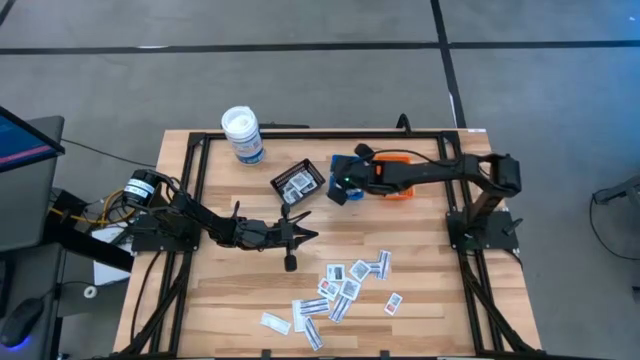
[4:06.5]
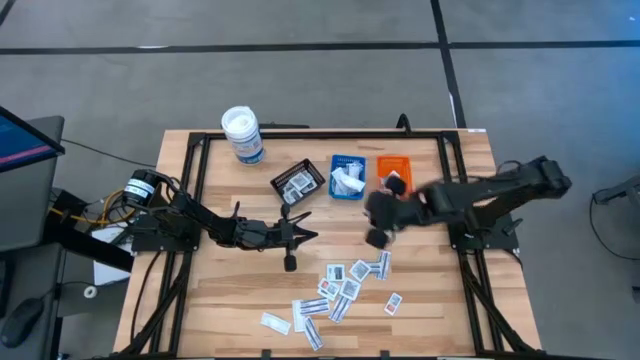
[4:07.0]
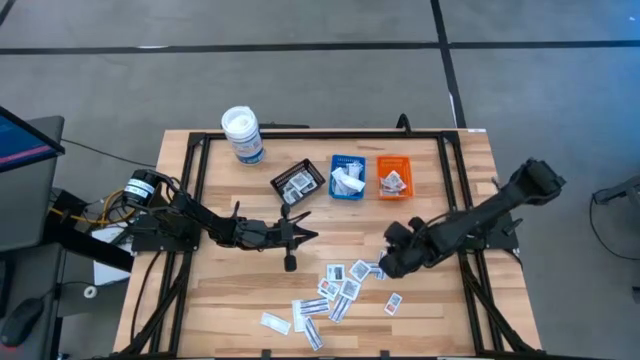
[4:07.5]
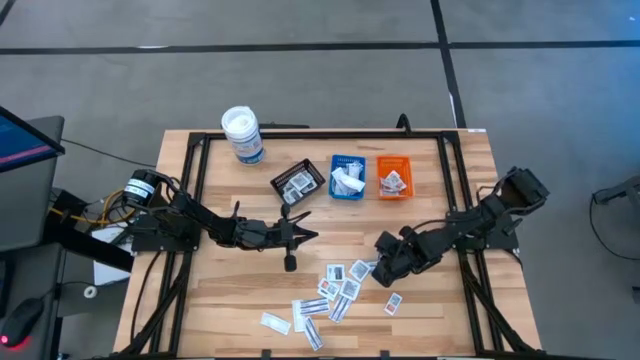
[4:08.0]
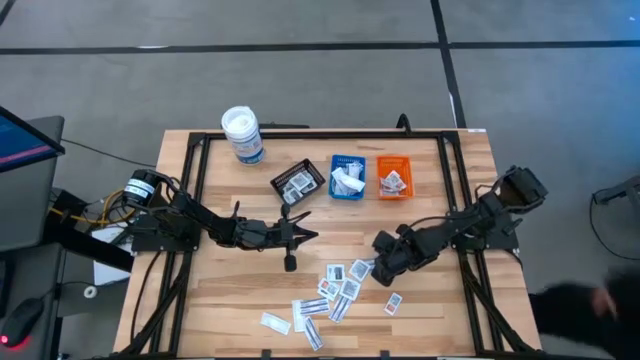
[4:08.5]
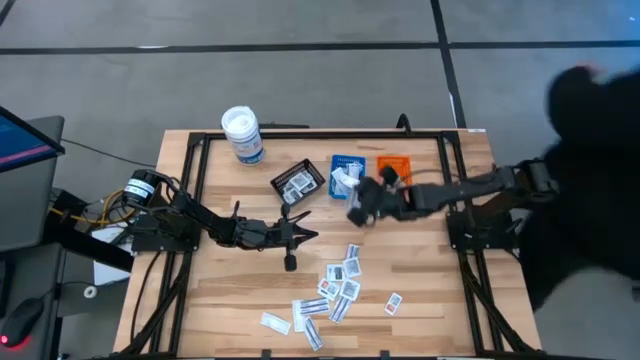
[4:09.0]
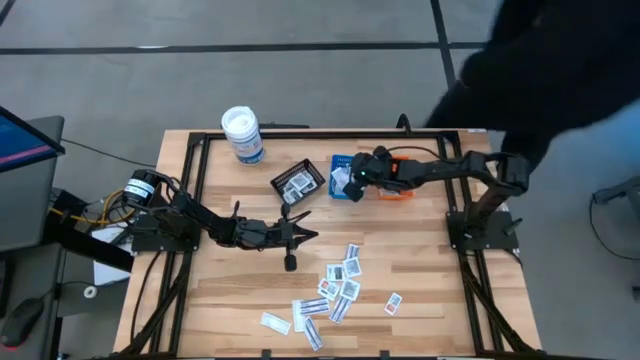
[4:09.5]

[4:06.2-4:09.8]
Task: Pick & Place First Aid Supplies
Put the blue bandage into the blue bin

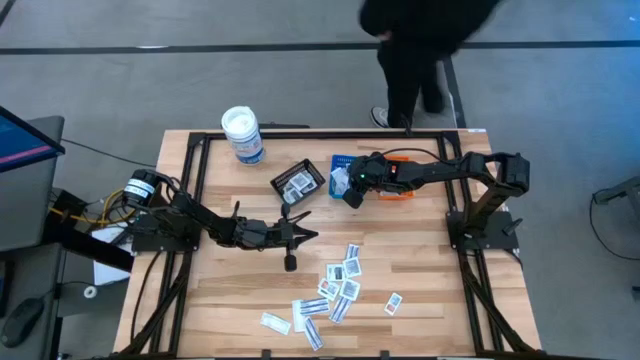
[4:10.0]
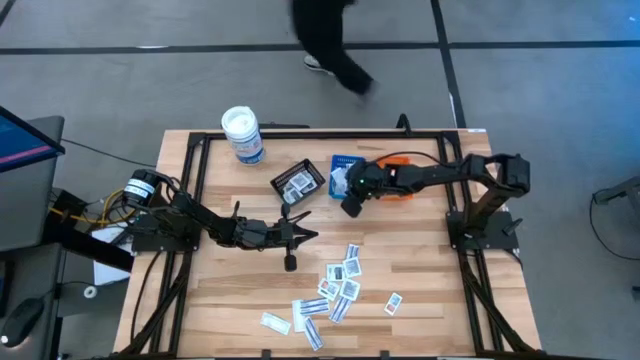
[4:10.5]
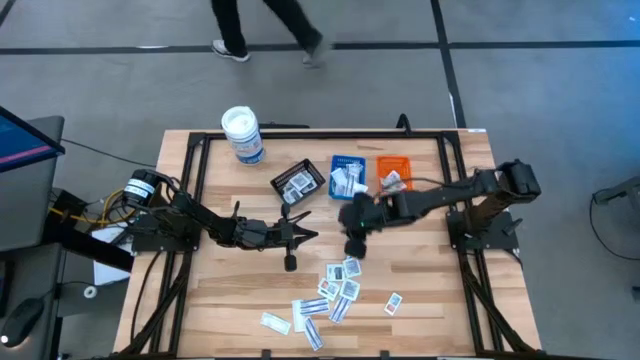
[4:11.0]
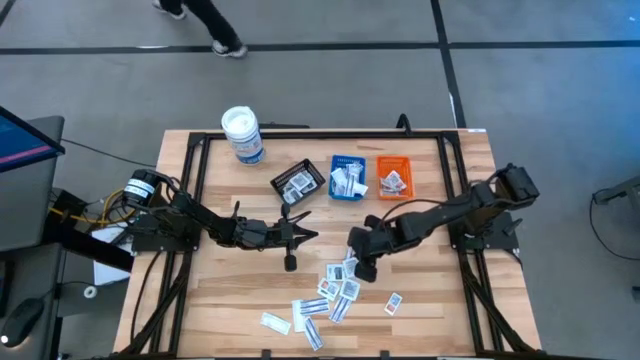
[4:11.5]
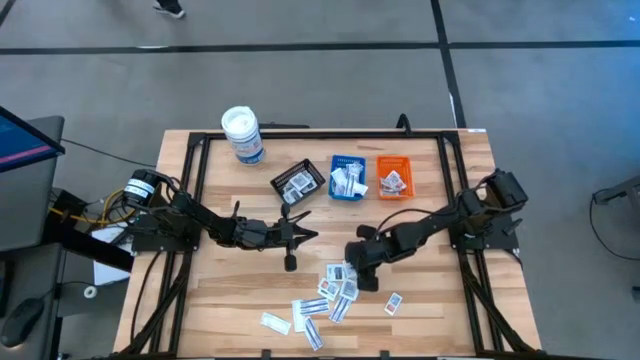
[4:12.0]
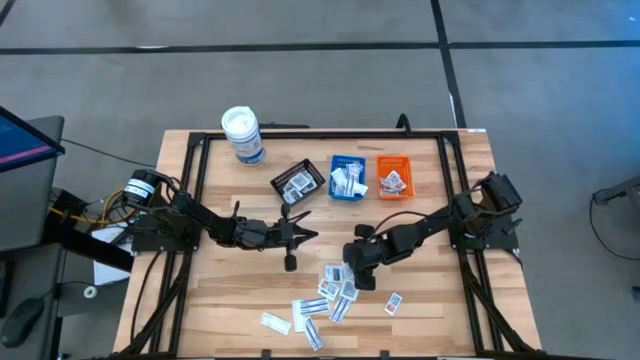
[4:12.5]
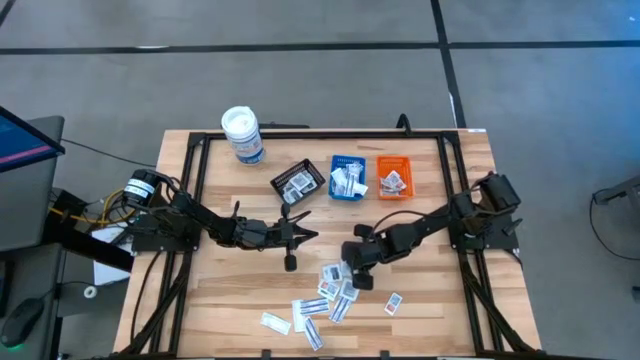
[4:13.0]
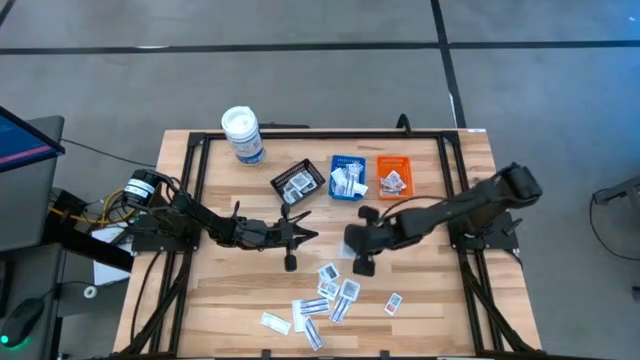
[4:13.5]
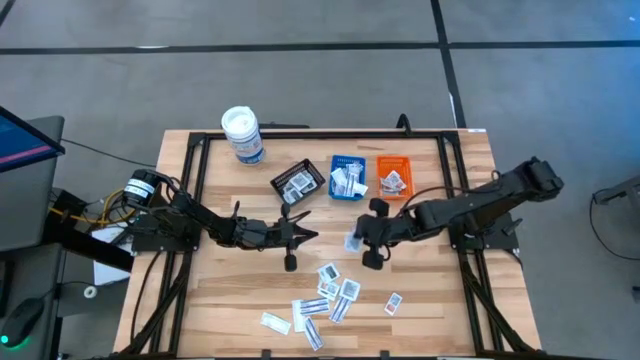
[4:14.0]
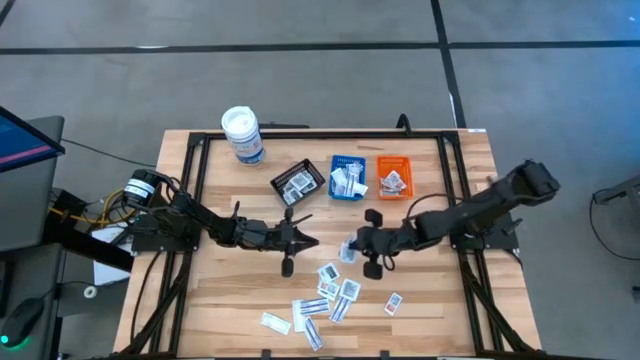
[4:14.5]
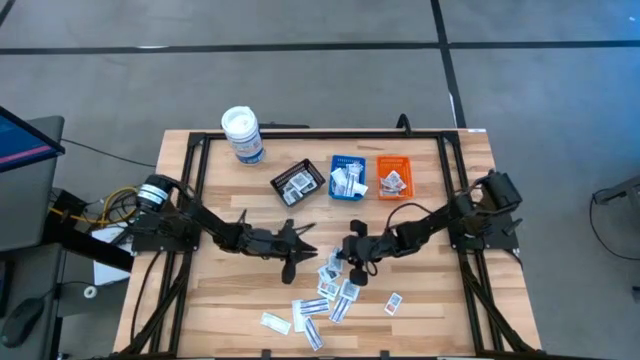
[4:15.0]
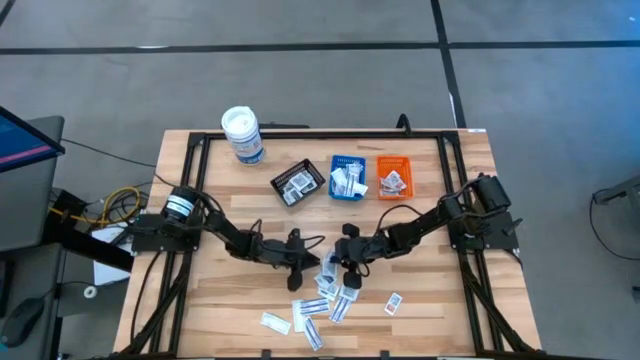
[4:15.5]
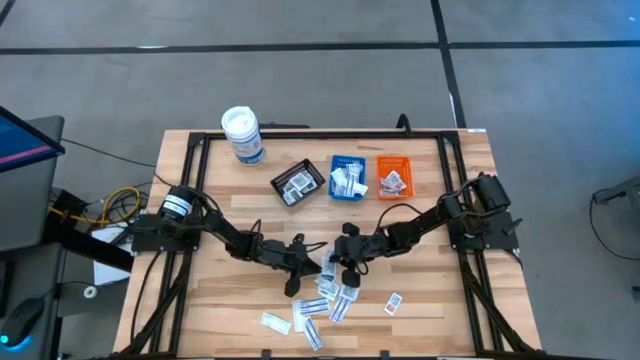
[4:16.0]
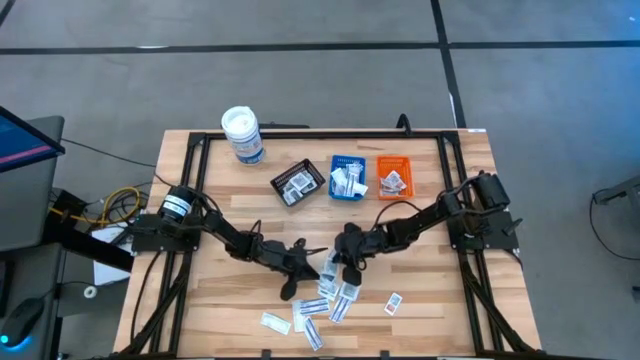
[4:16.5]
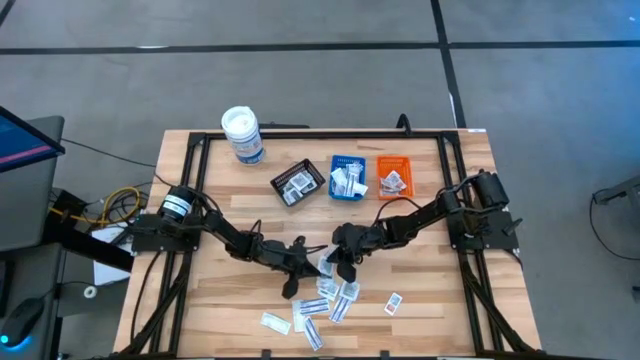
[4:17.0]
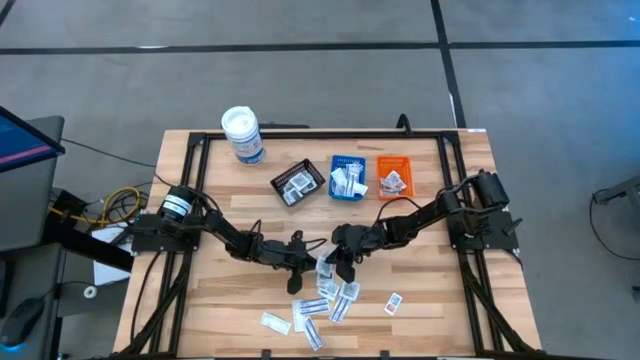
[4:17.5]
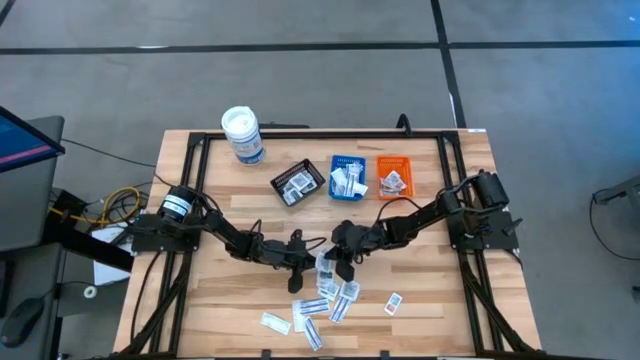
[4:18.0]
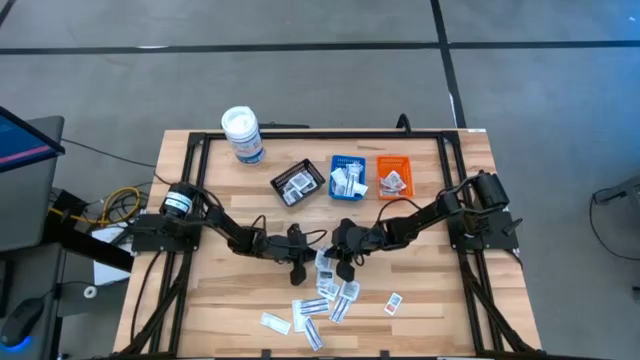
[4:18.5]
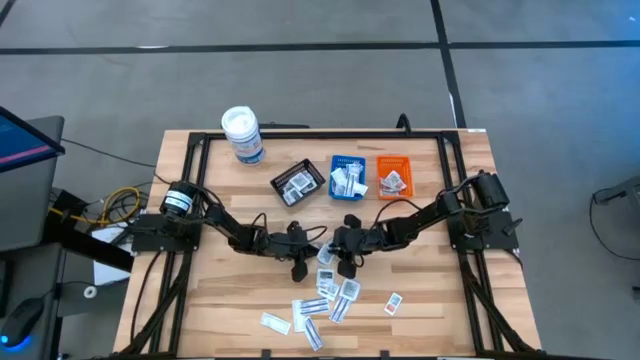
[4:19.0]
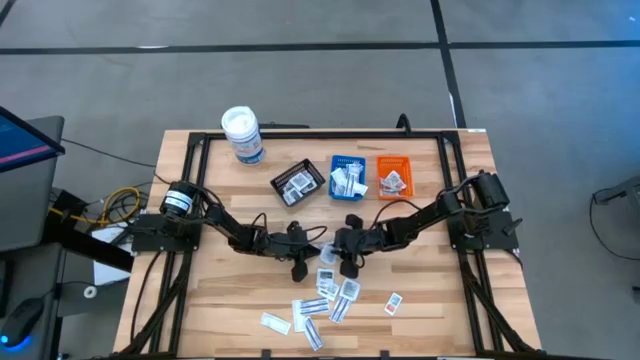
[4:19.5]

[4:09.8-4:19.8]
Put the black towelette pack into the black bin

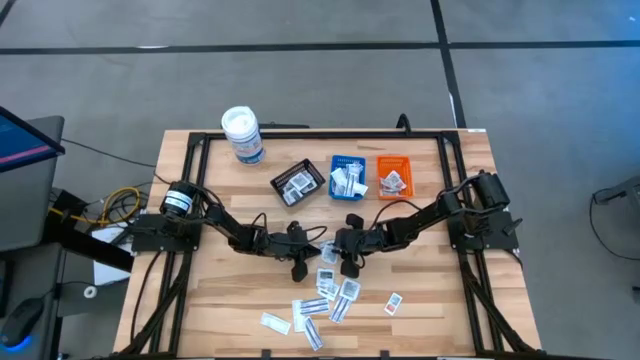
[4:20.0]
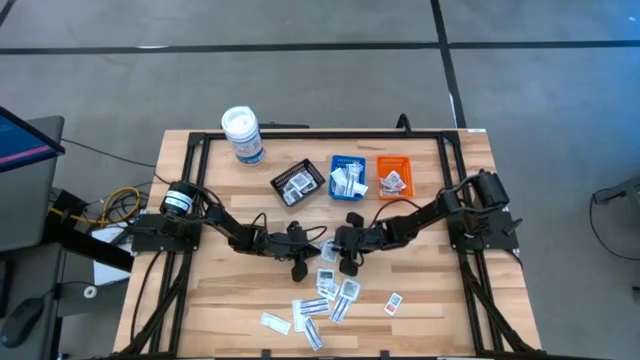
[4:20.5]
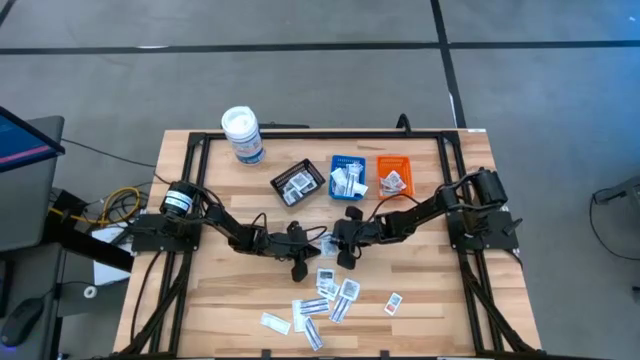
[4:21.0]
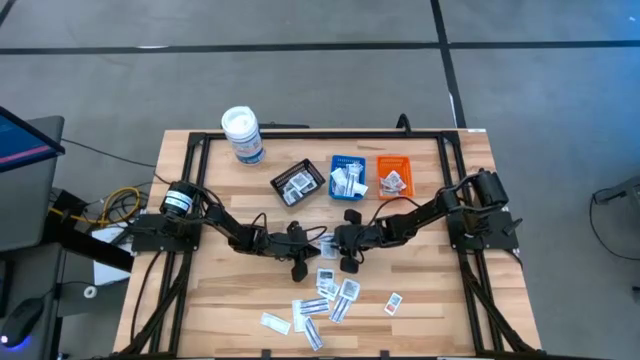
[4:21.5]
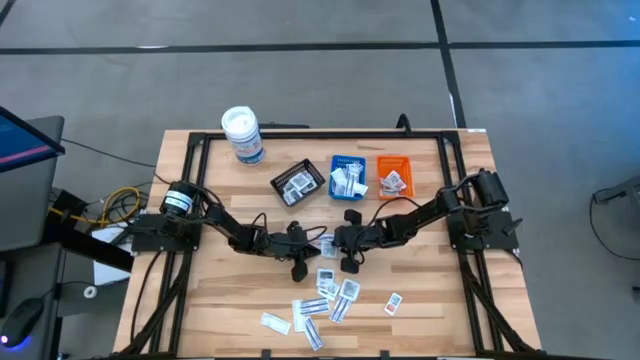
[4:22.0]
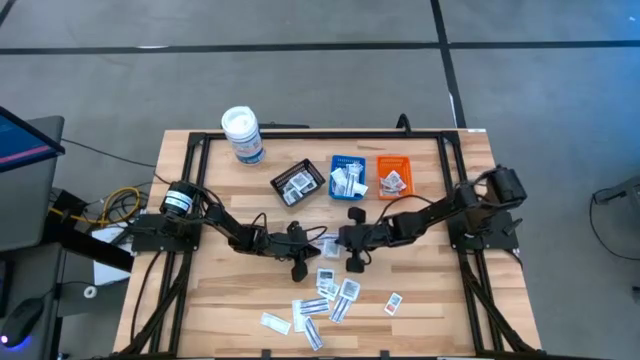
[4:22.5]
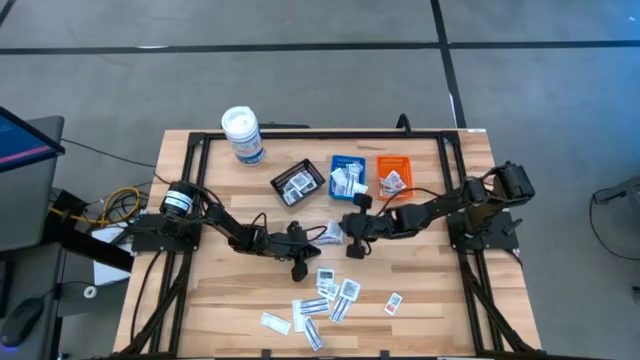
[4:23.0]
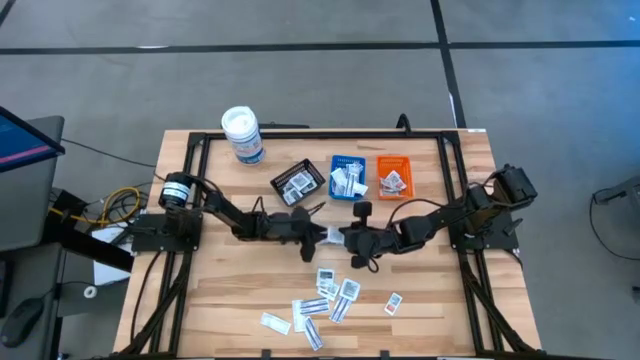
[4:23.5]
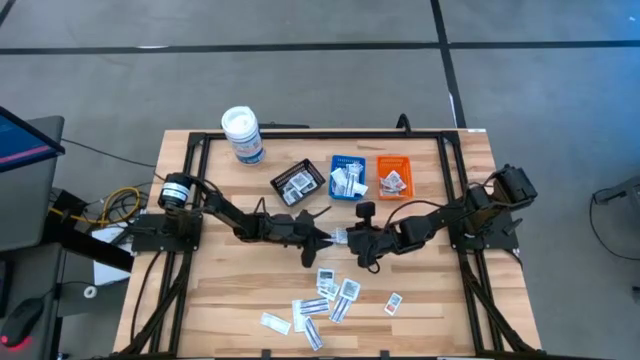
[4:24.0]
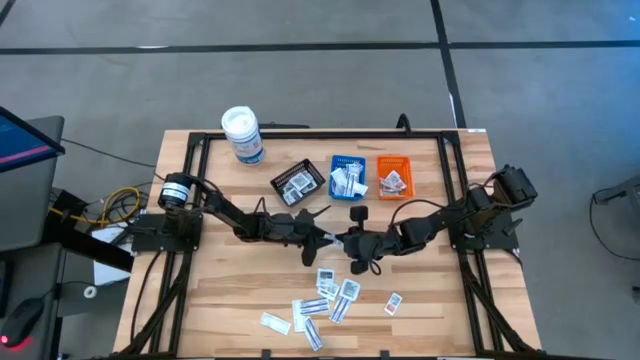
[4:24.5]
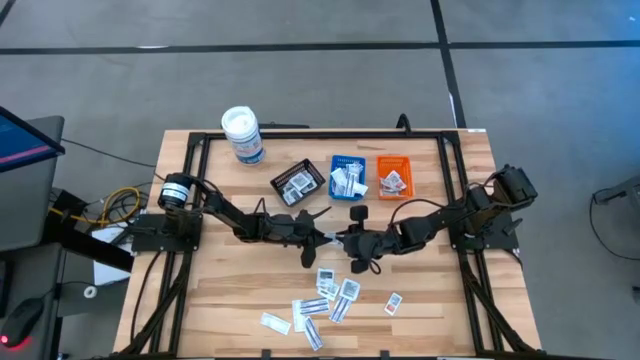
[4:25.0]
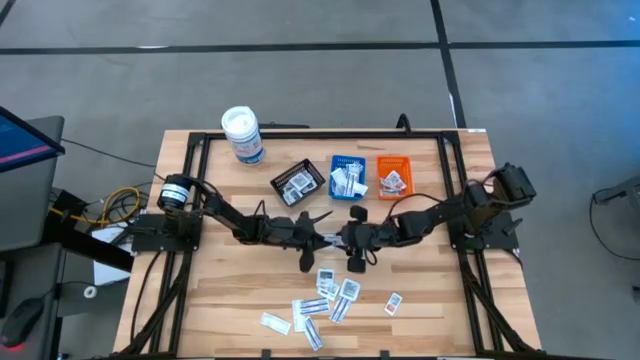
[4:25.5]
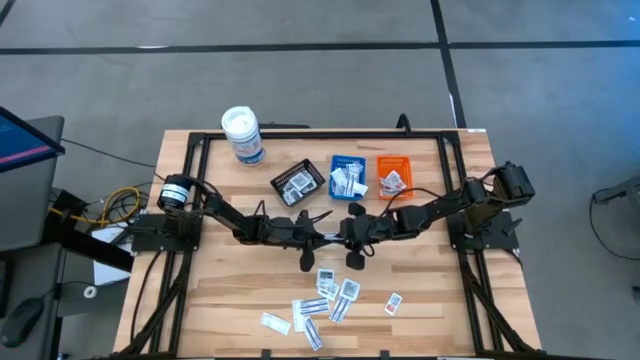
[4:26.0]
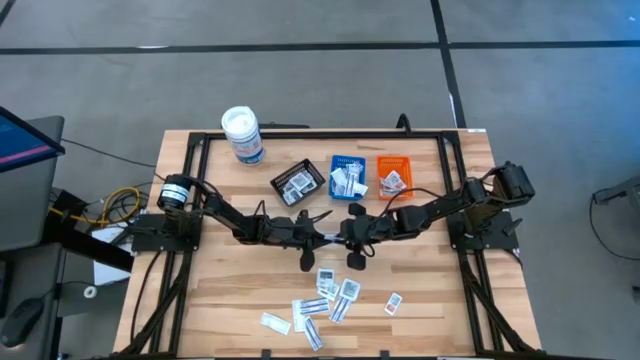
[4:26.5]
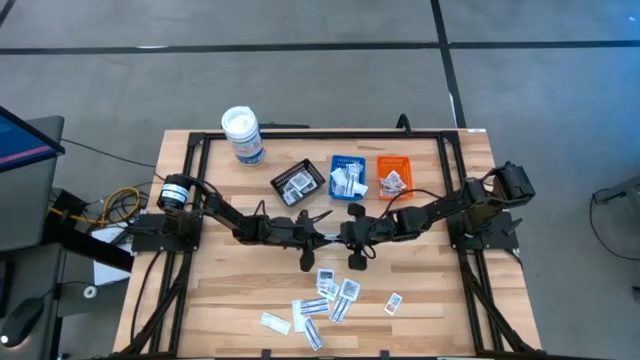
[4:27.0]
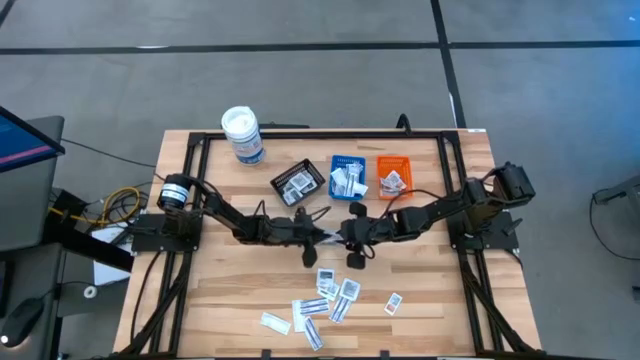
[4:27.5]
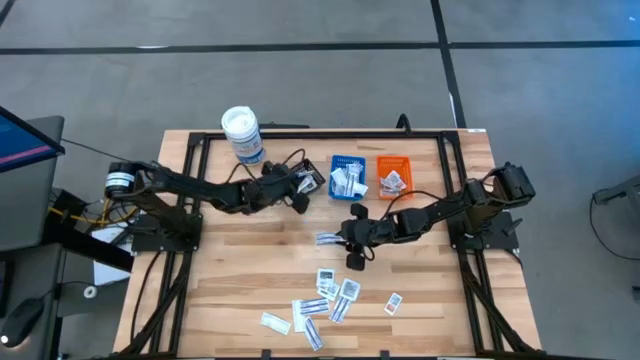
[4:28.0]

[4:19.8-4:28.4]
Put the black towelette pack into the black bin
